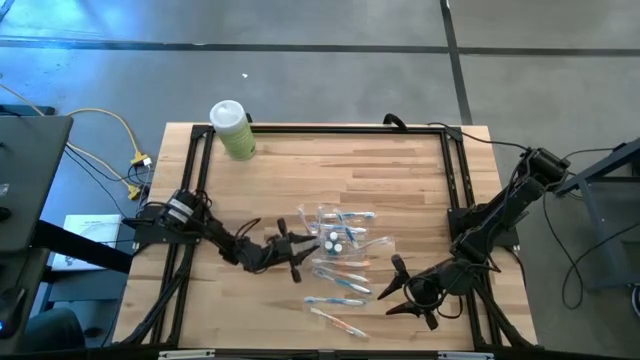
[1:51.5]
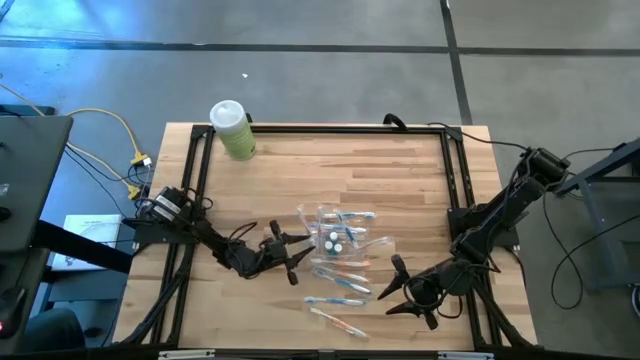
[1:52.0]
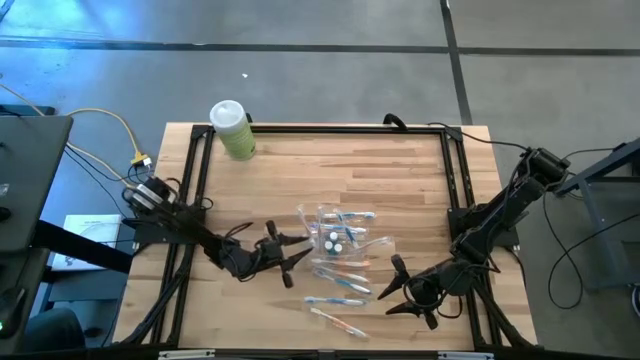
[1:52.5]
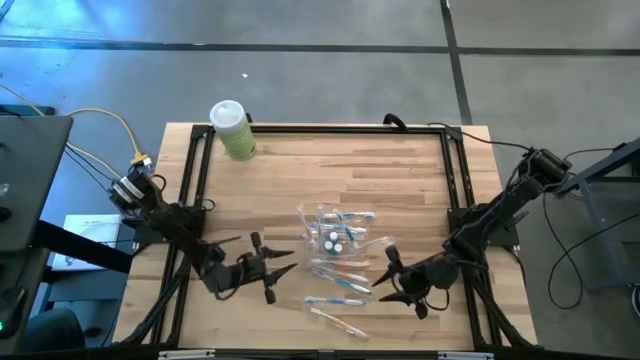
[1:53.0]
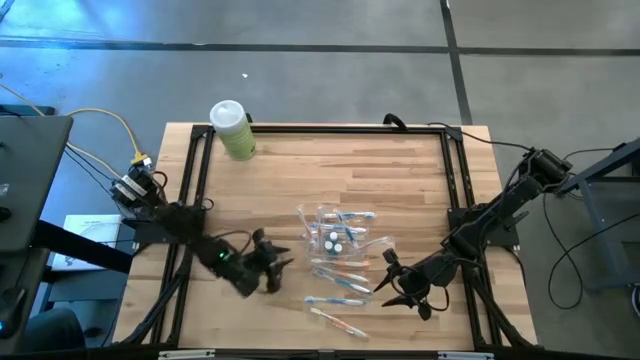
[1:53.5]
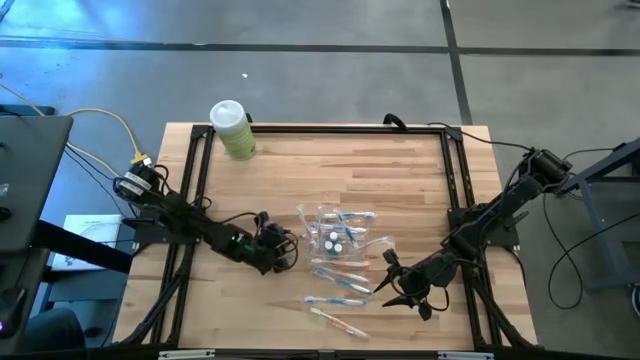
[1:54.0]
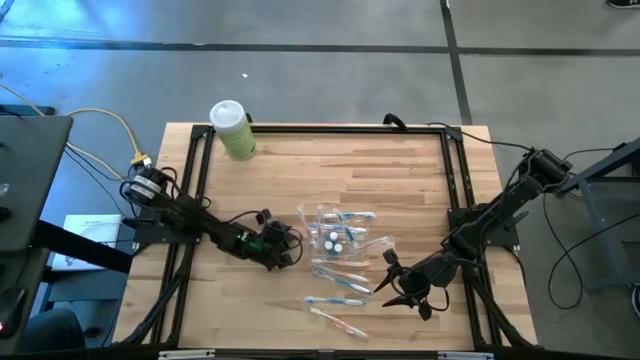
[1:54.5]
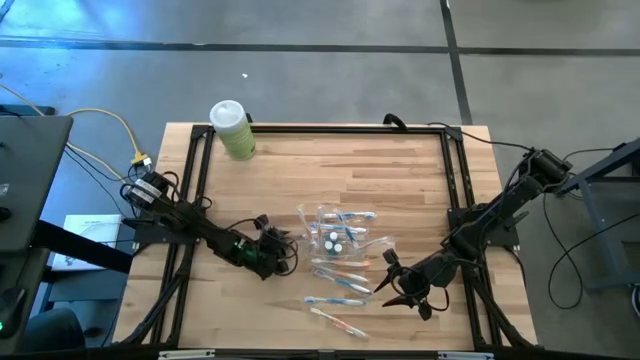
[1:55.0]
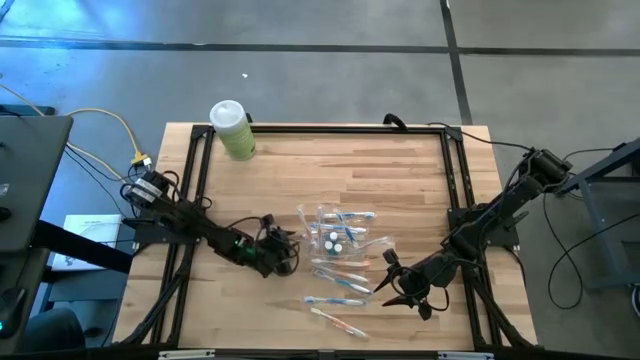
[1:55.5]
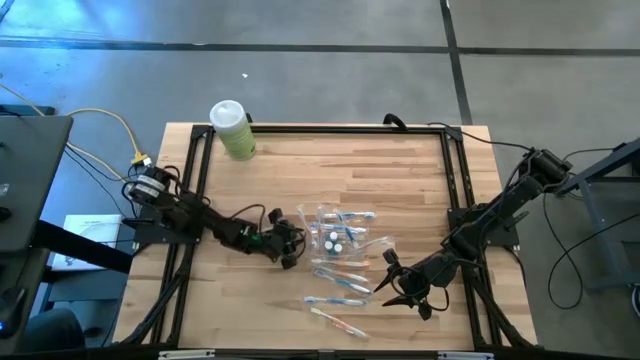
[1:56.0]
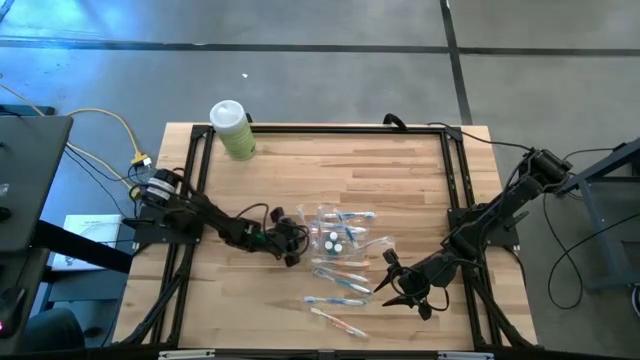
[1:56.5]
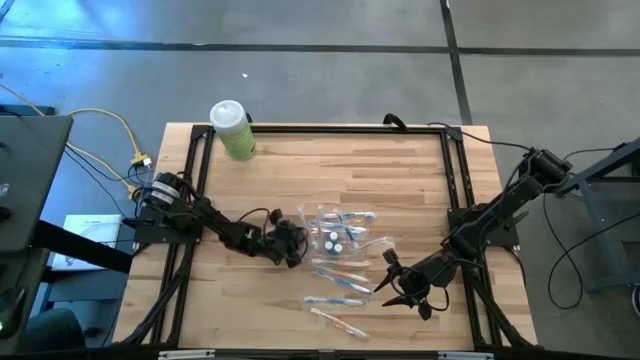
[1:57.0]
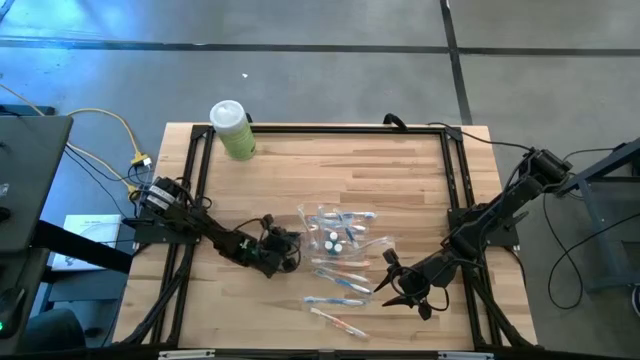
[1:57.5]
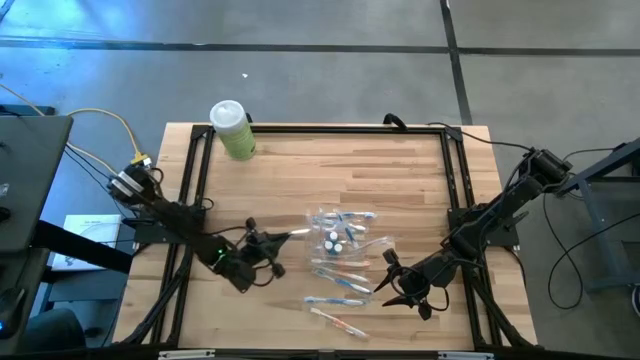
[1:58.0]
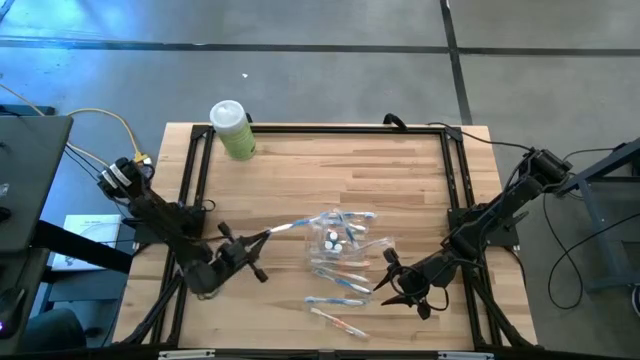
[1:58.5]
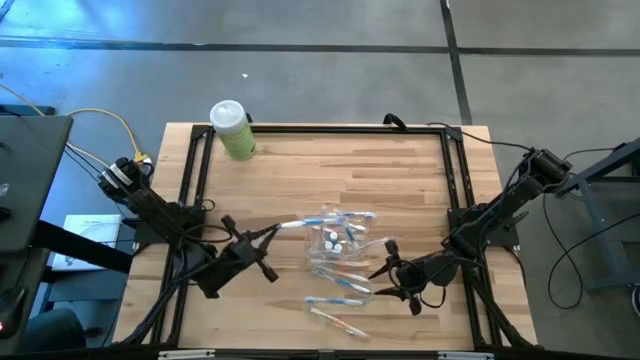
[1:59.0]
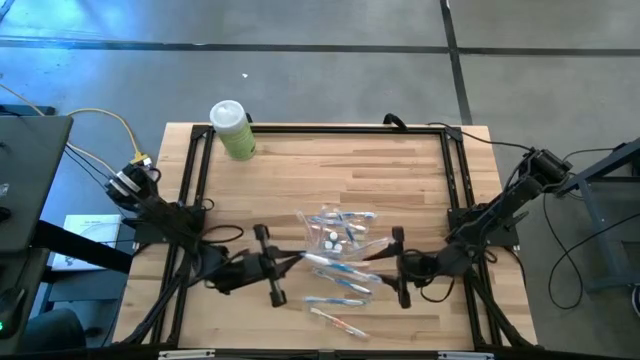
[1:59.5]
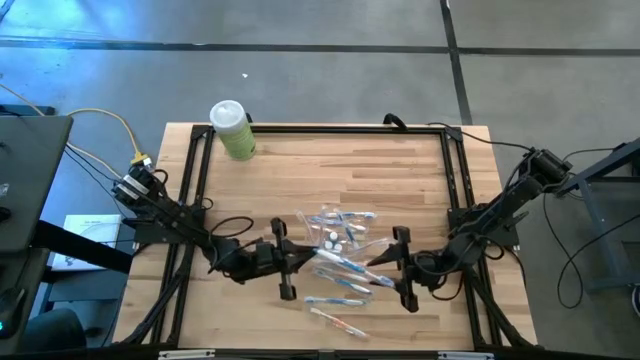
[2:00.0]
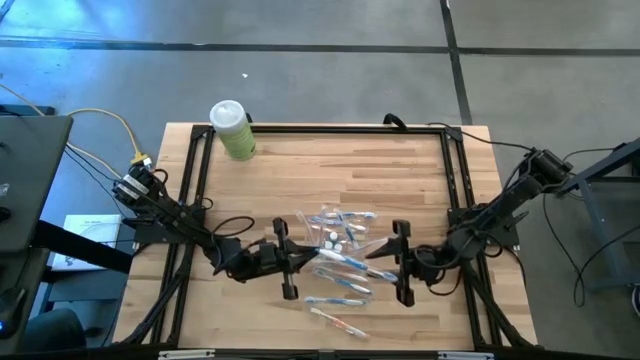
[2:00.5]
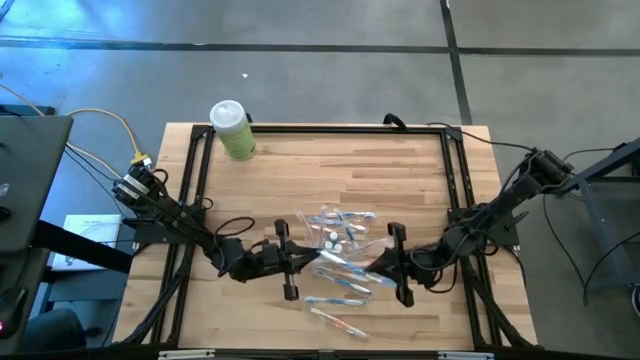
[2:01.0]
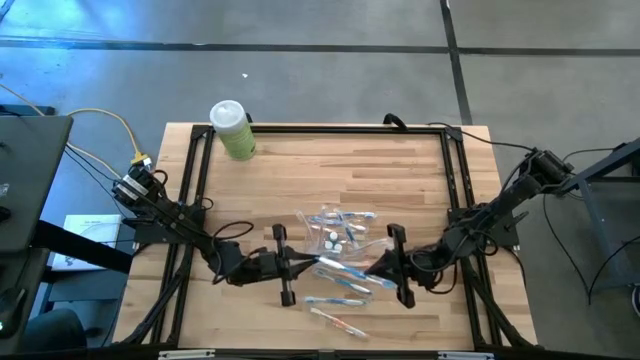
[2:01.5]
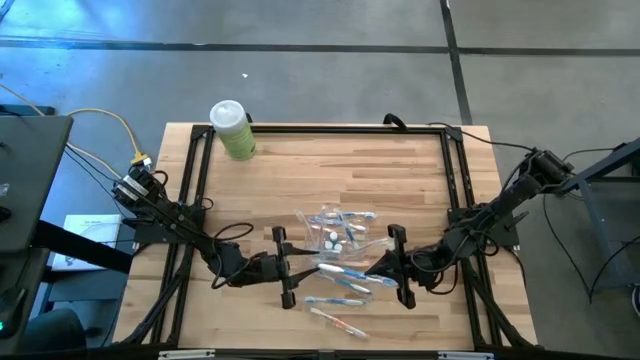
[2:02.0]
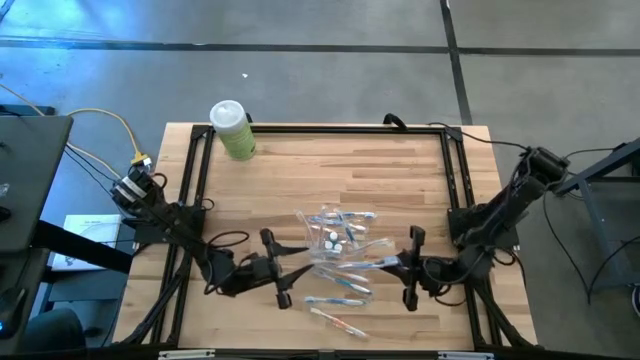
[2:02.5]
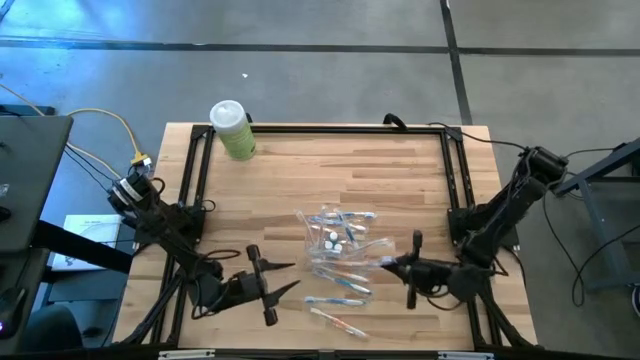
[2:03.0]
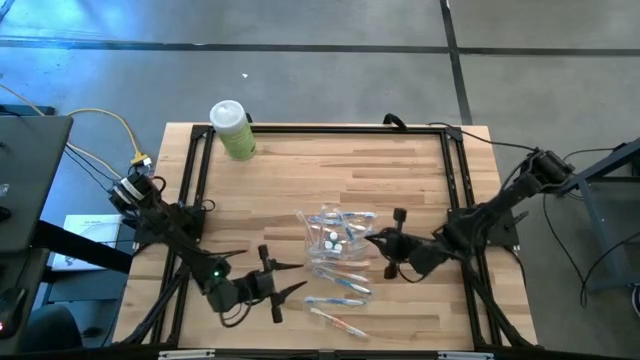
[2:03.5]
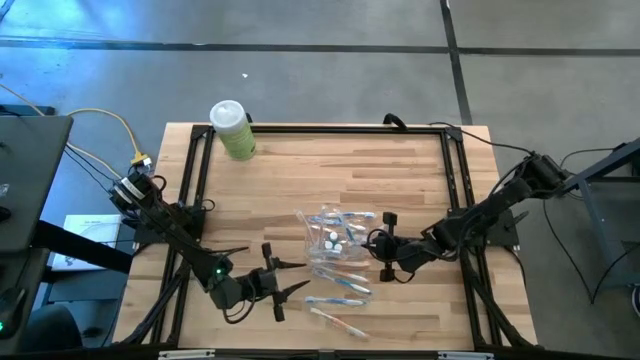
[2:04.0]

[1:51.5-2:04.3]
Task: Pick & Place toothbrushing station
Put the blue toothbrush into the transparent organizer

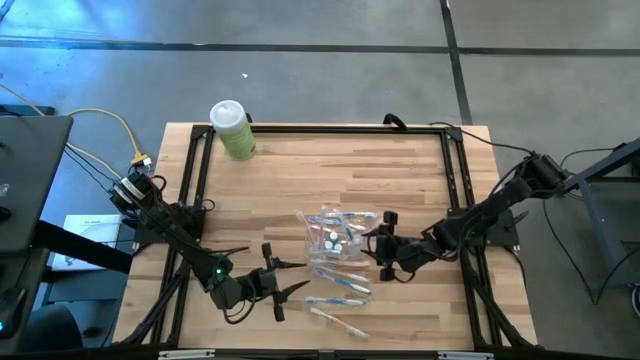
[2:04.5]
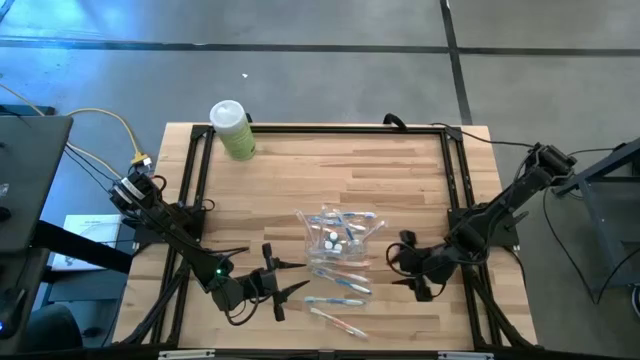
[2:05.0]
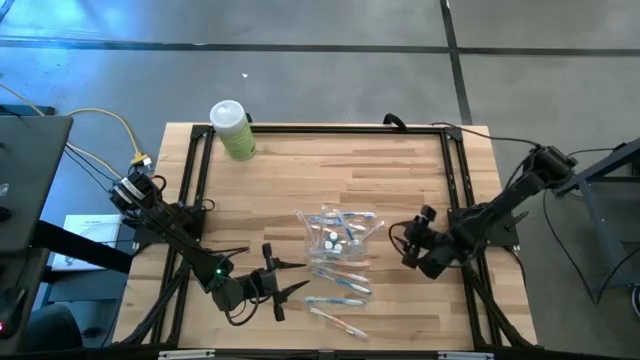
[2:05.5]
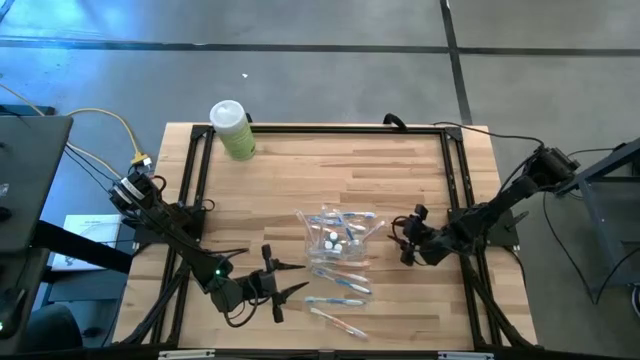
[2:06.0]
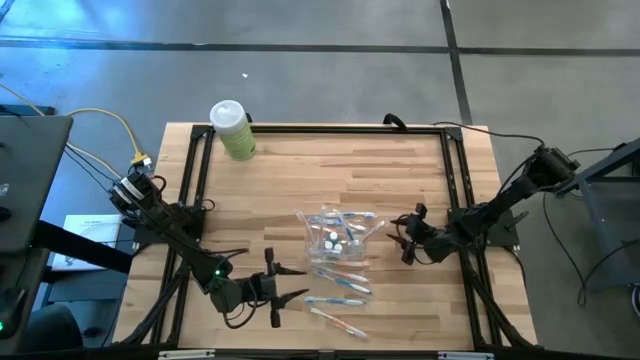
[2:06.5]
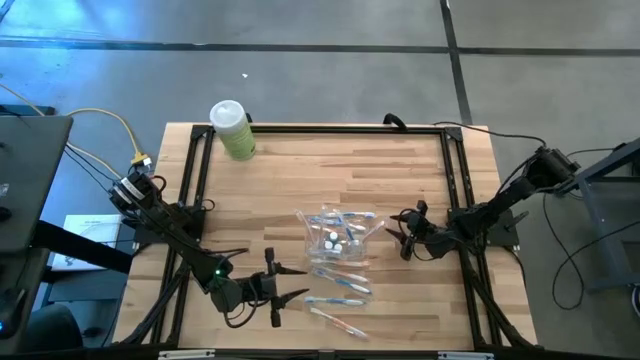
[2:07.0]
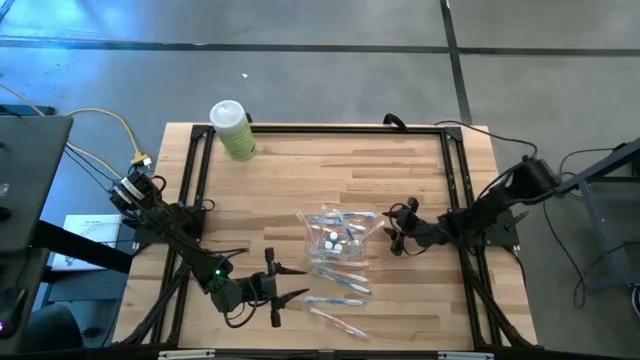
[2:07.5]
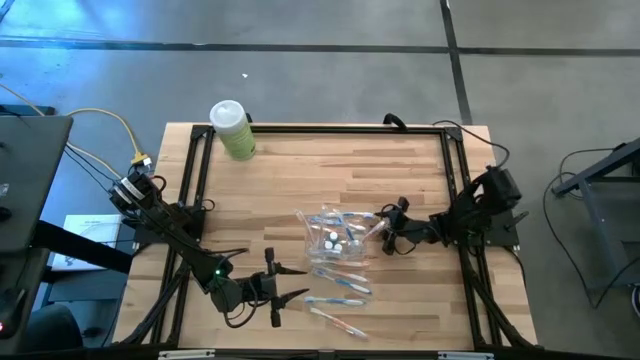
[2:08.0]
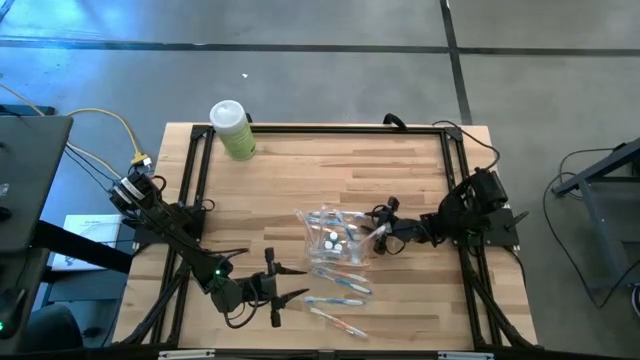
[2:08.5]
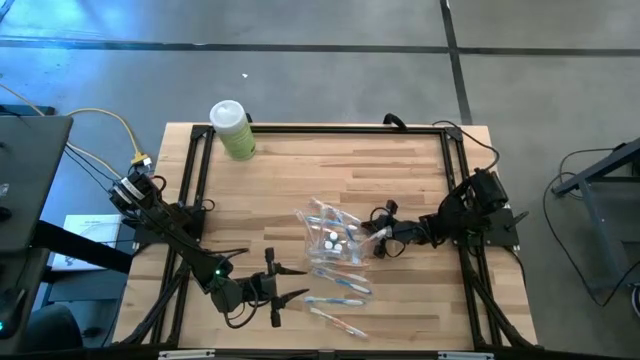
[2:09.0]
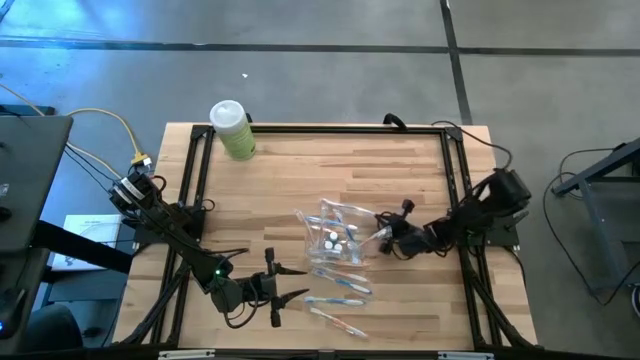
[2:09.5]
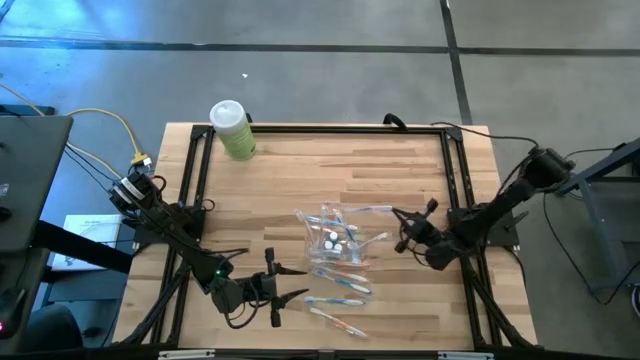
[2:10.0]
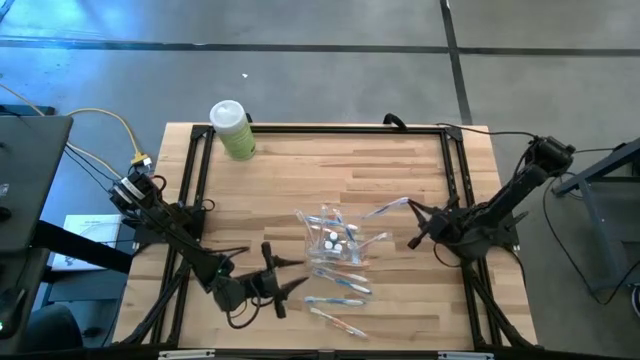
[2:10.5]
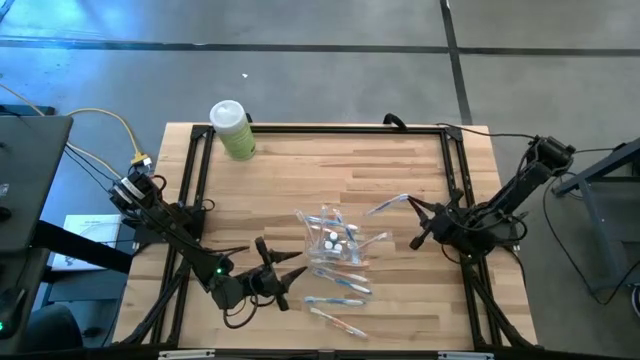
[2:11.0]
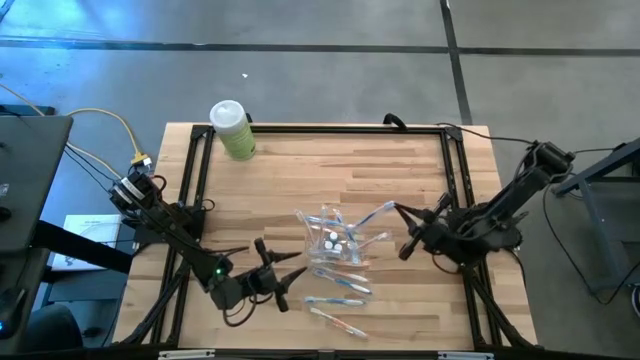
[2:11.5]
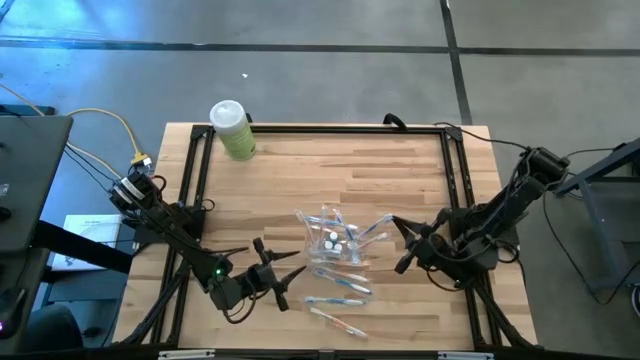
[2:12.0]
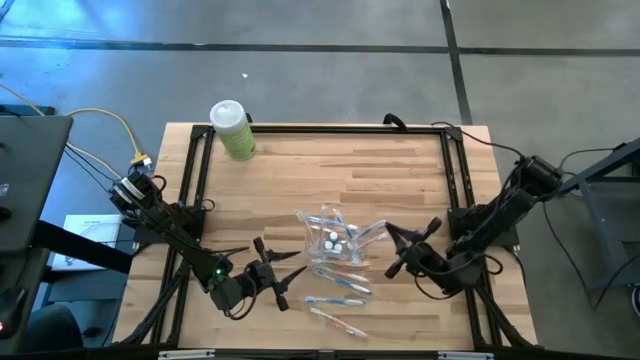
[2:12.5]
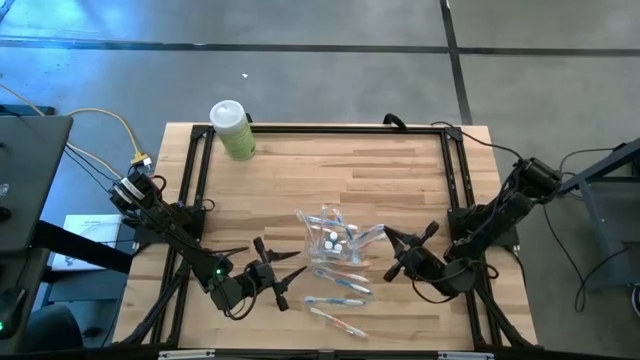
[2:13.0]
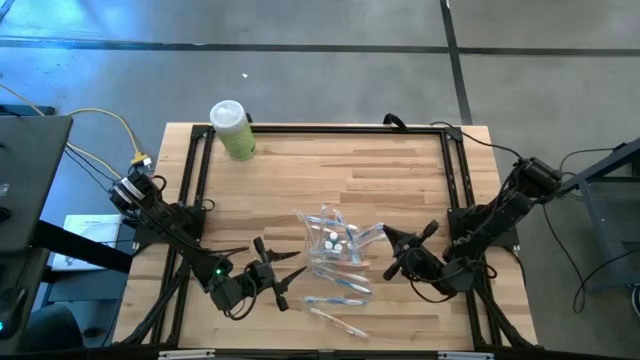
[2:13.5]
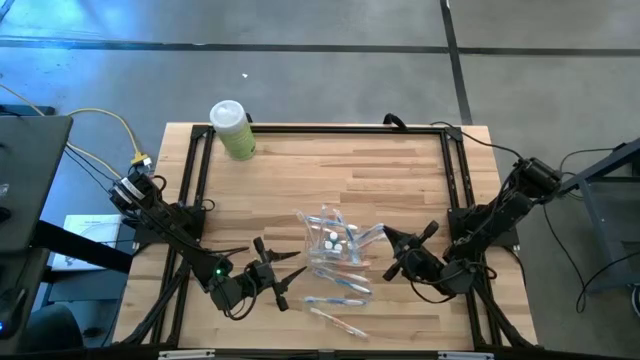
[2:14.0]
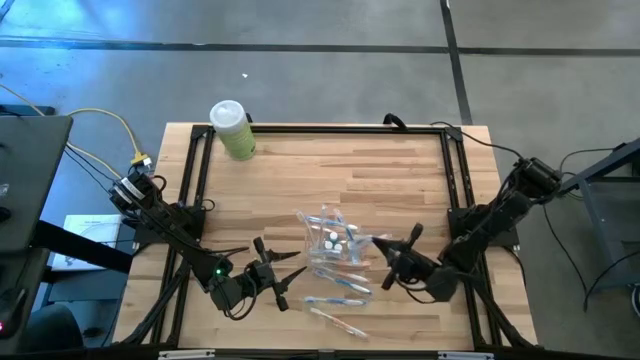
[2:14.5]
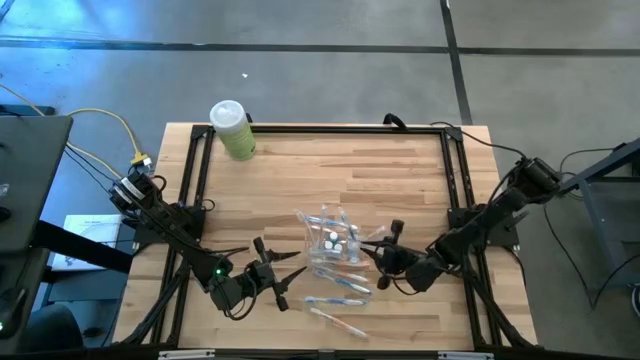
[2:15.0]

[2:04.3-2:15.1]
Put the blue toothbrush into the transparent organizer
